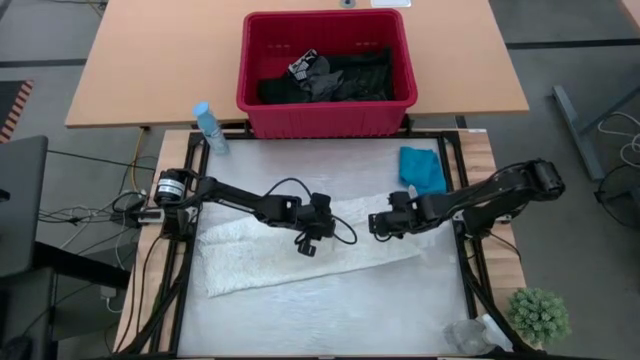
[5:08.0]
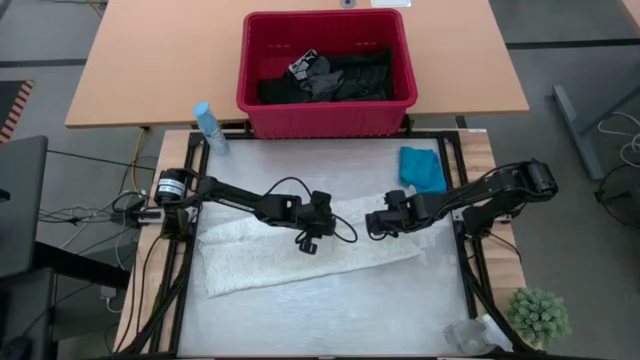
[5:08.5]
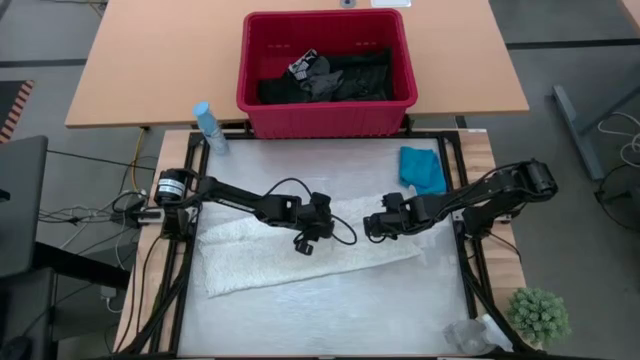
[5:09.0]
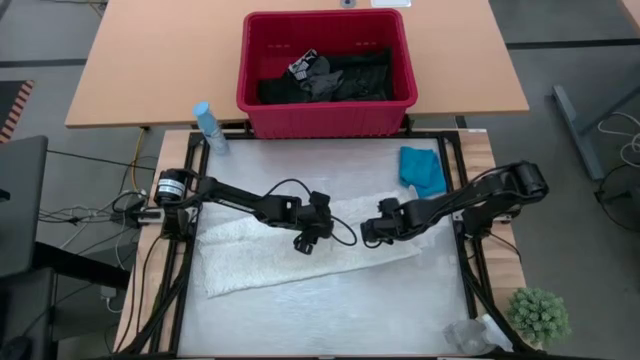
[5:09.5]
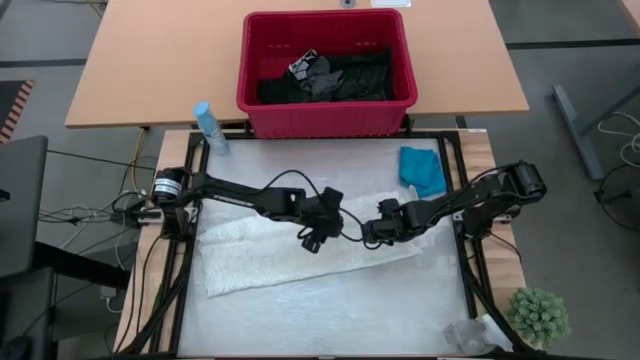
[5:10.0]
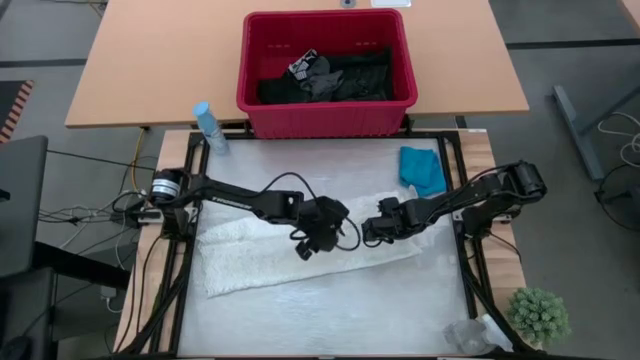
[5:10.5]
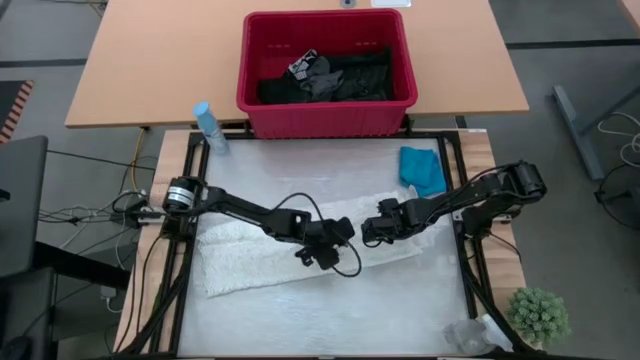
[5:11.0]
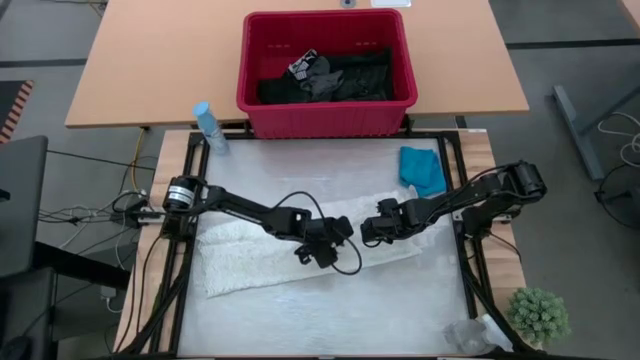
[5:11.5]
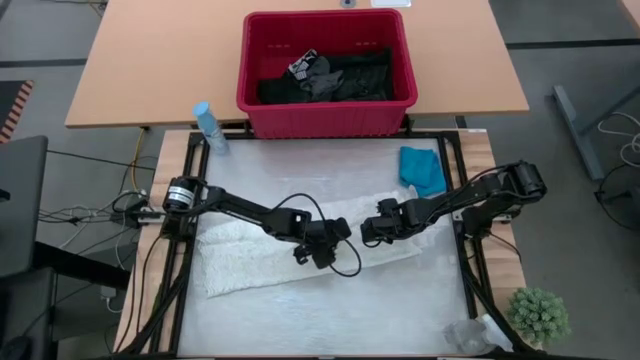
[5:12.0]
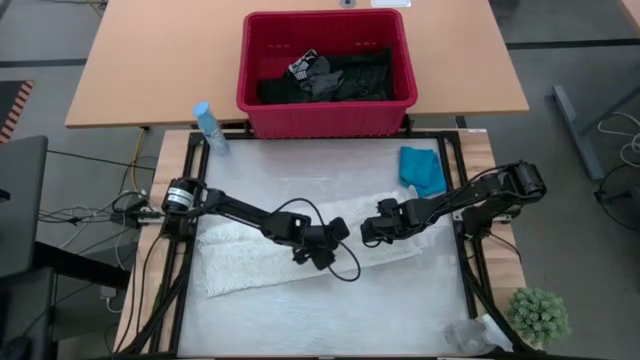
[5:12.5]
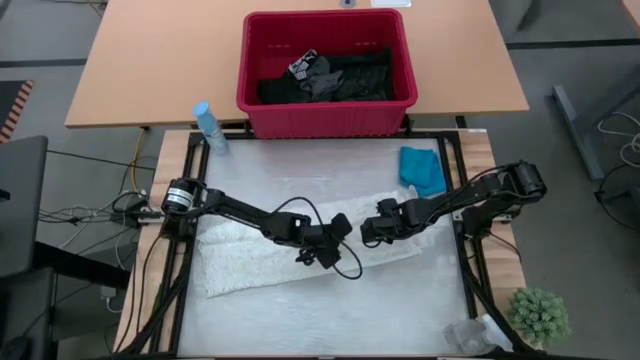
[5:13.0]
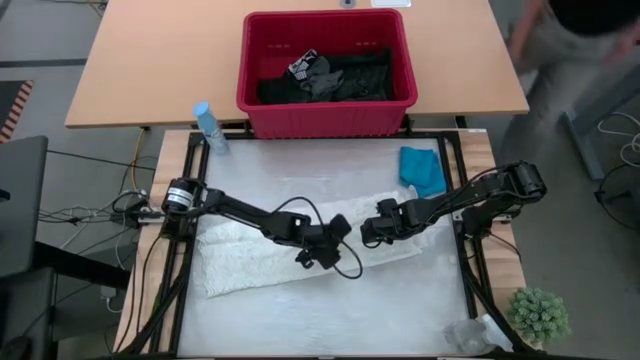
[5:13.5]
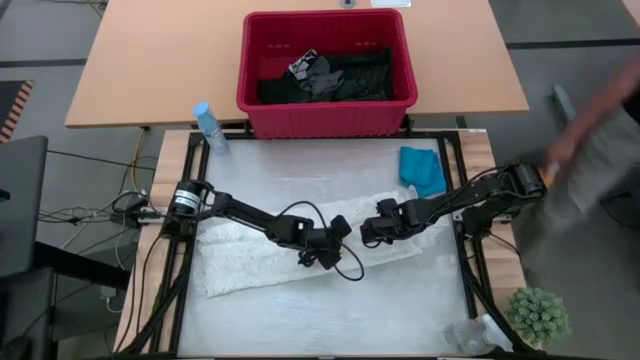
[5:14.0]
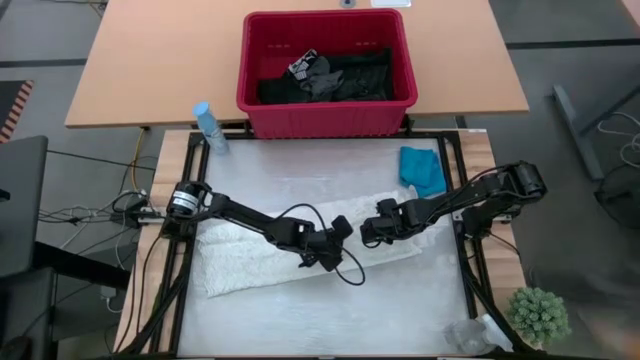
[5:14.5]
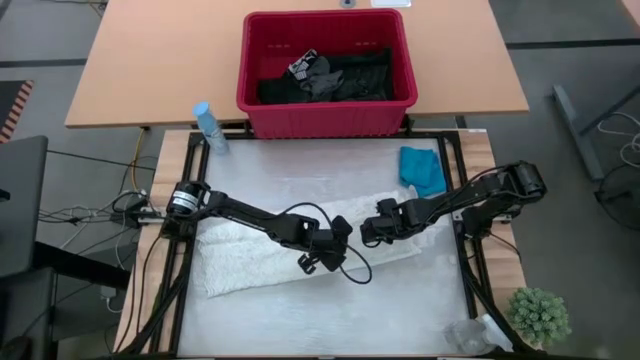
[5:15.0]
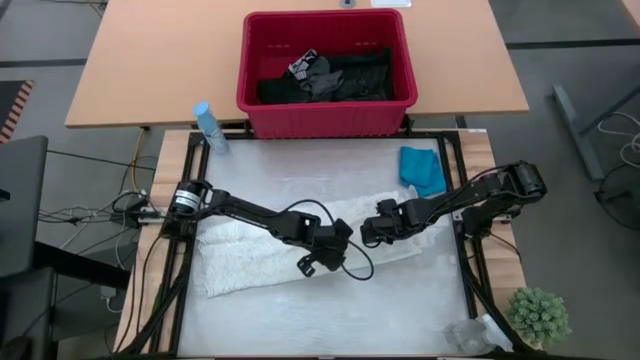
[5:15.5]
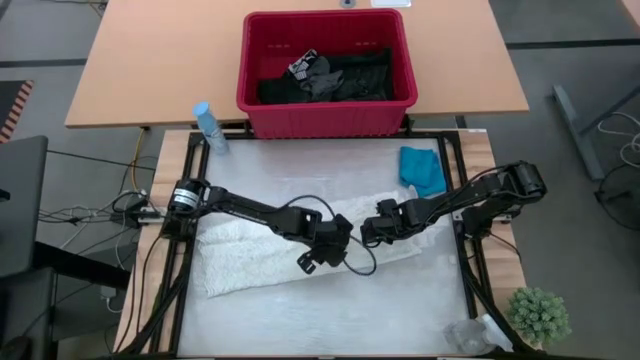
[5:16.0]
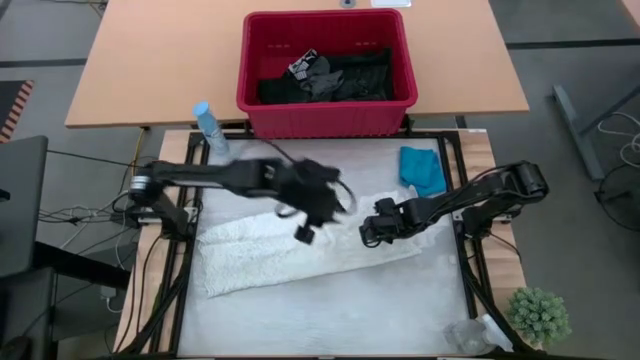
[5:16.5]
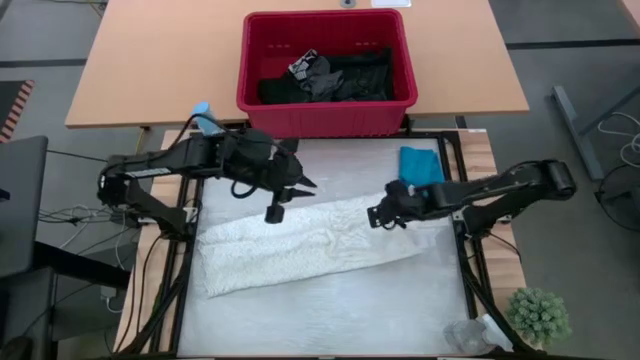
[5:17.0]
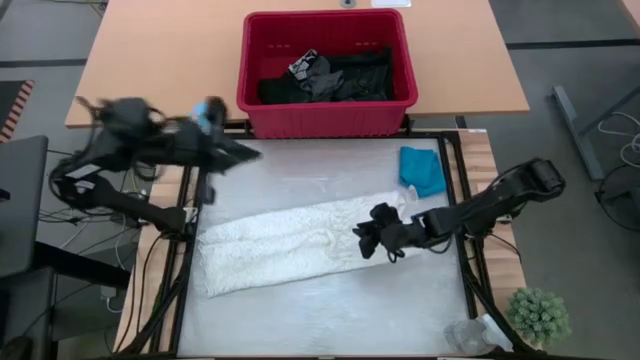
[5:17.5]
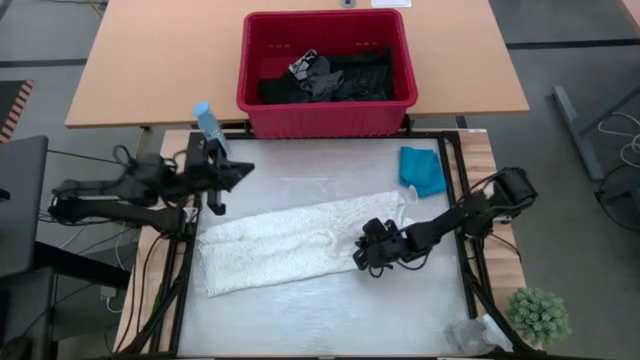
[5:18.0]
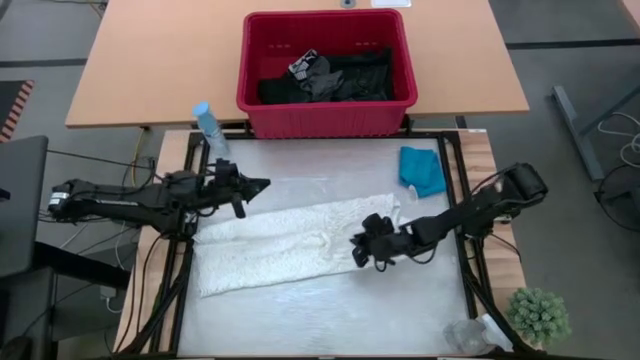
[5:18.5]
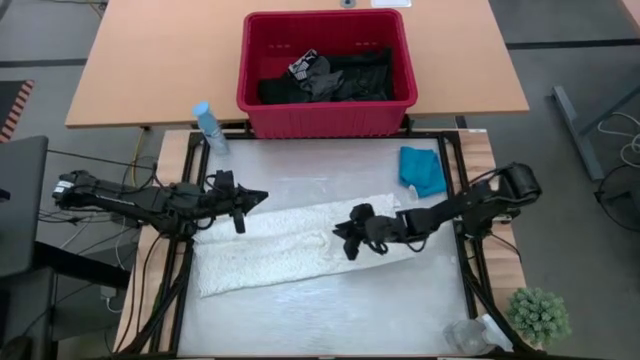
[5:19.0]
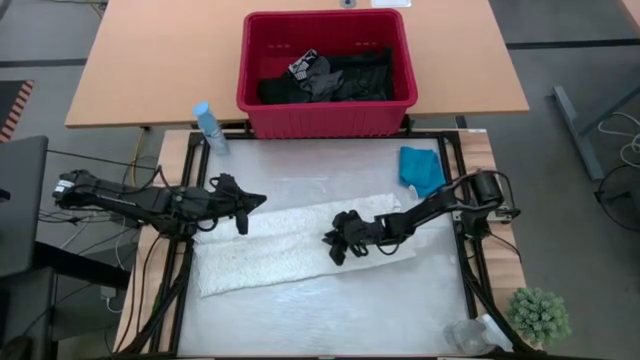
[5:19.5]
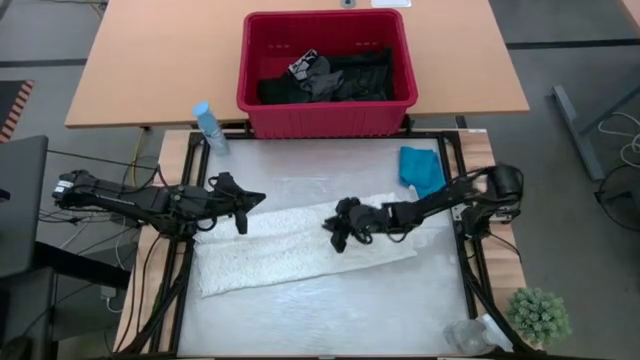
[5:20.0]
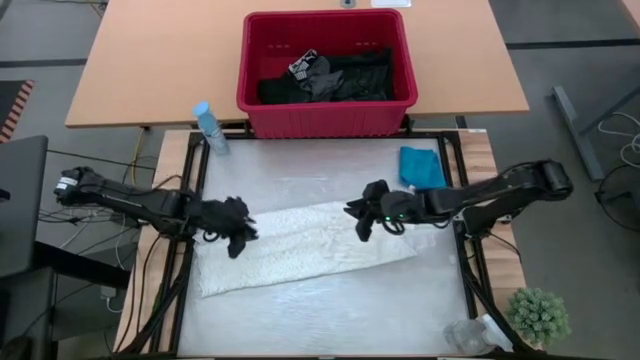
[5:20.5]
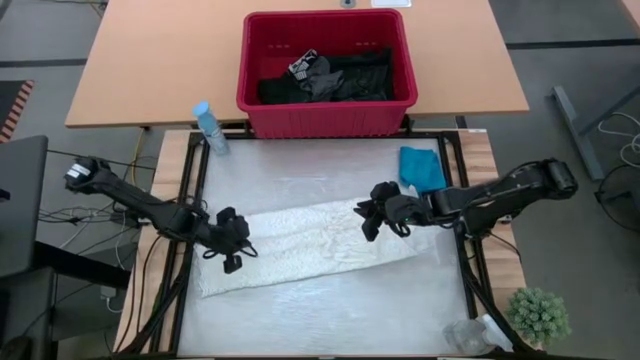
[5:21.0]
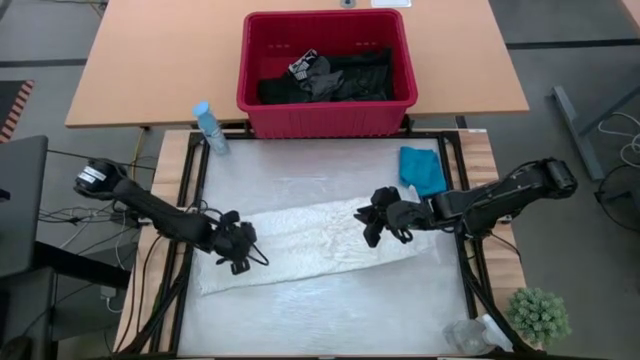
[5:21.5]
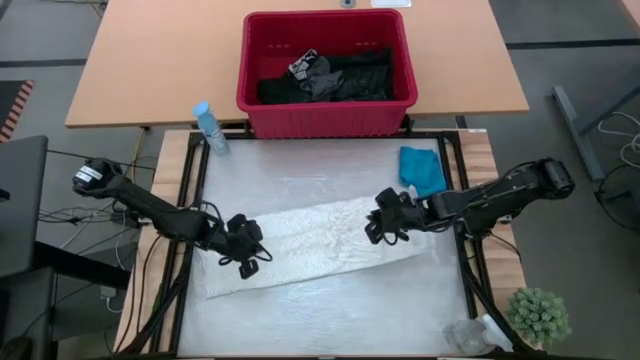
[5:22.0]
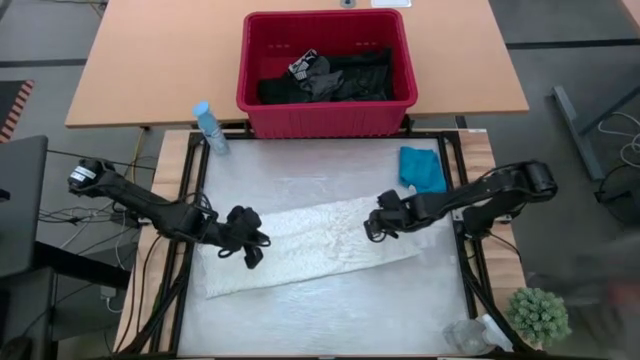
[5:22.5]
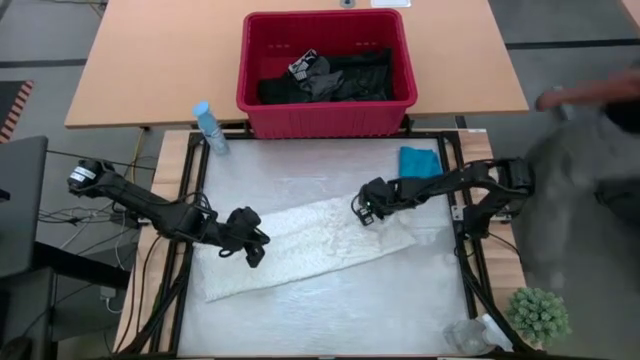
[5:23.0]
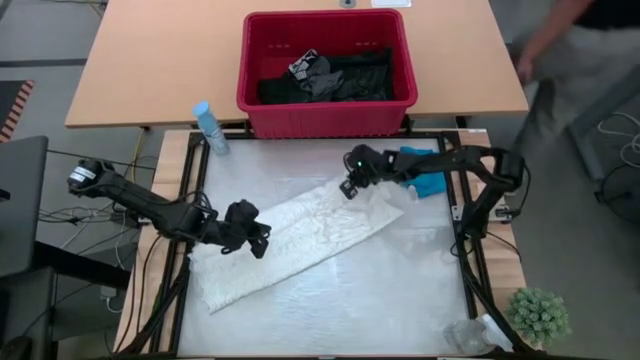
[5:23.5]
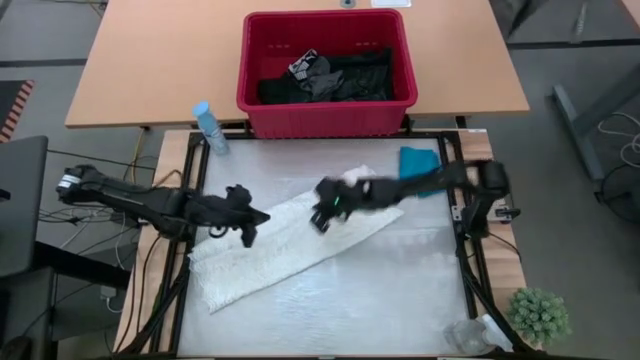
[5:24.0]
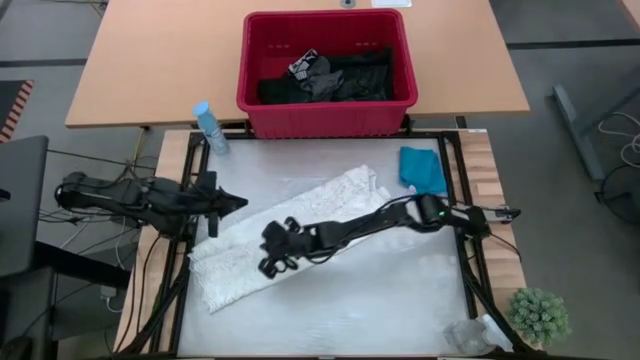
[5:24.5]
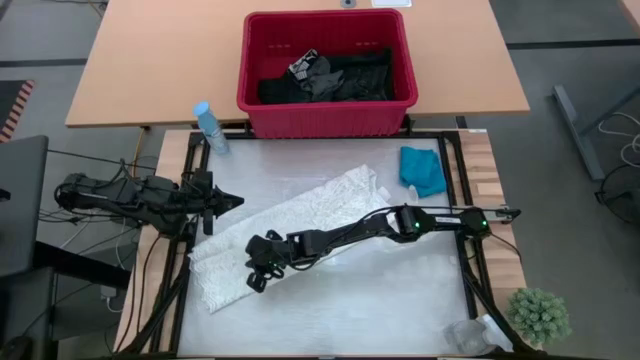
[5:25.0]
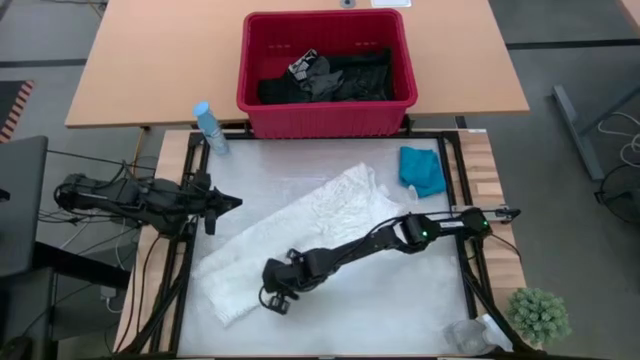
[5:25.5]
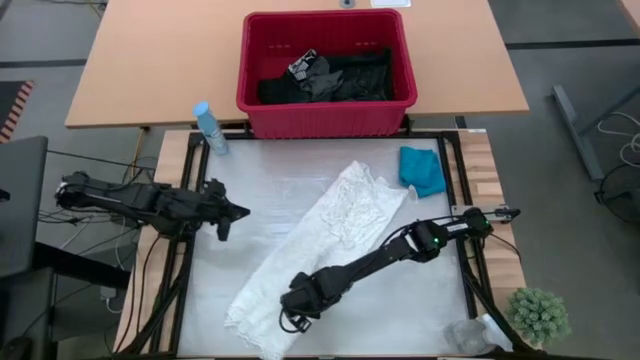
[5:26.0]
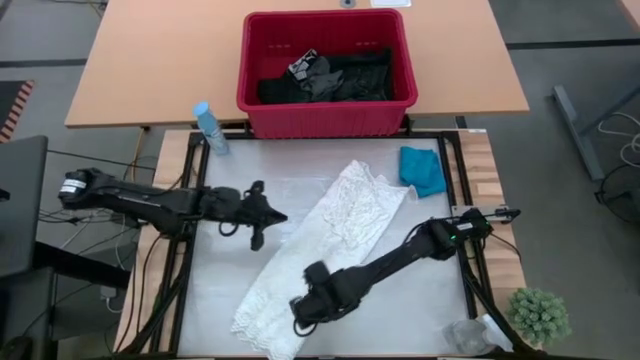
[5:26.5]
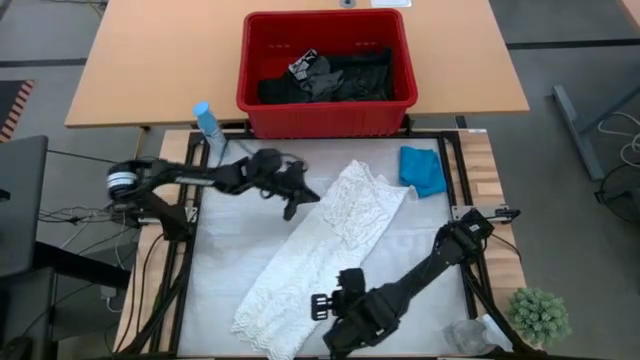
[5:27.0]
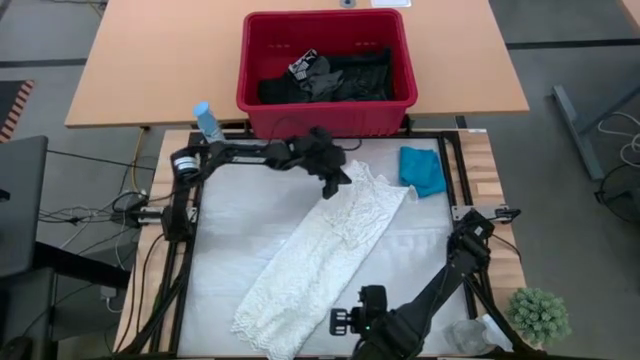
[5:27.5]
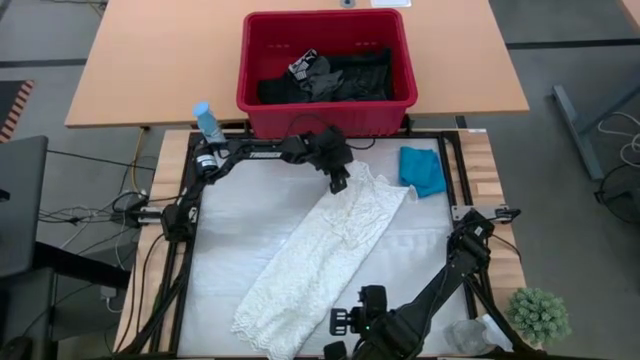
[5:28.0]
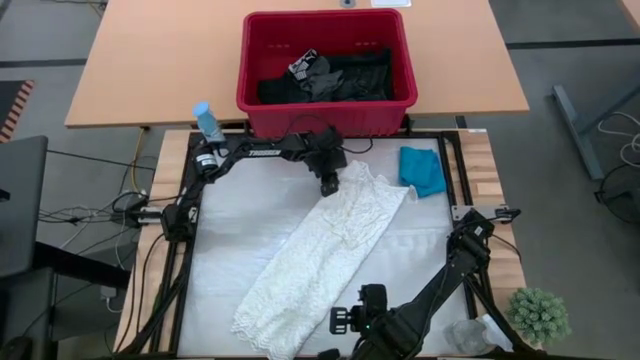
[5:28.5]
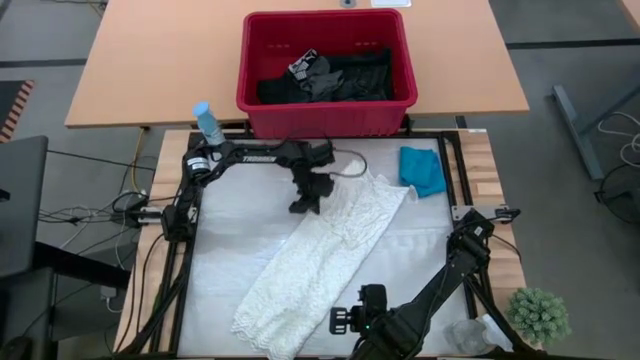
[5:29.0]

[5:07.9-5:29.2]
Task: Fold laundry
Fold the white shirt

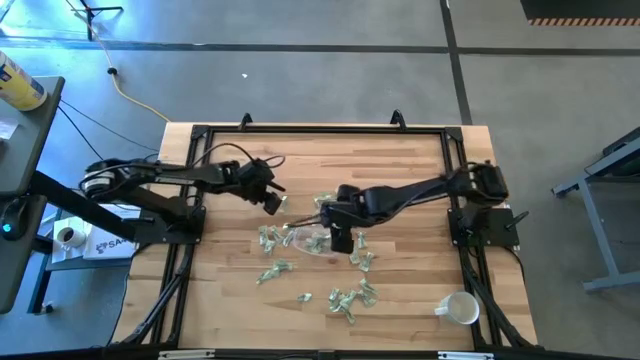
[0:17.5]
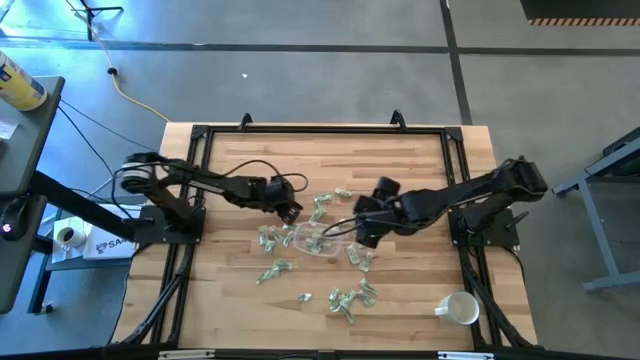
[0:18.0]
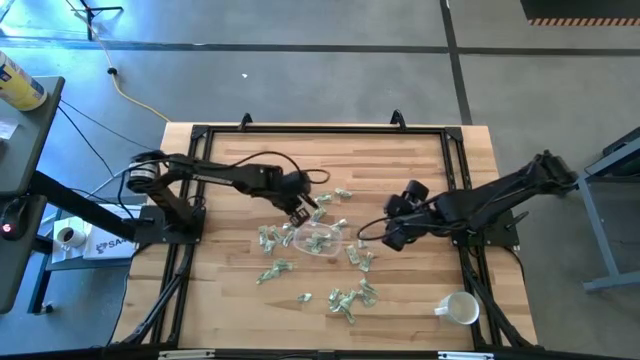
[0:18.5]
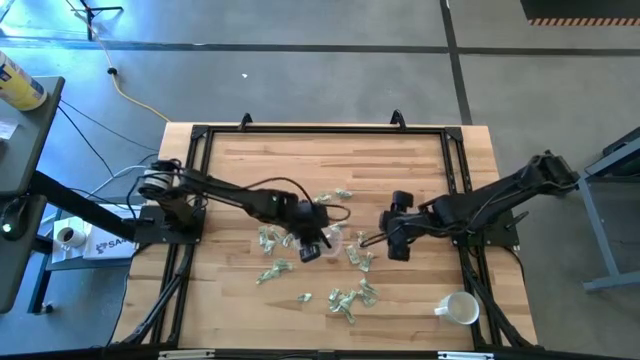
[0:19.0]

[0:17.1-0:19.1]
Task: Pick and place Stevia / Truvia into bins
Put the green stevia packet into the transparent bin
